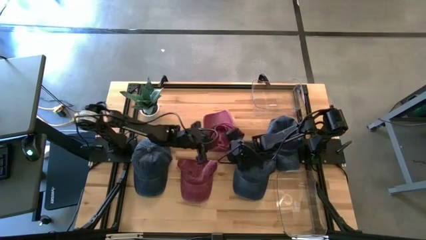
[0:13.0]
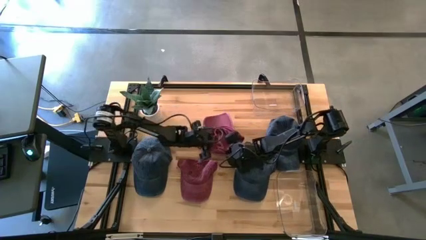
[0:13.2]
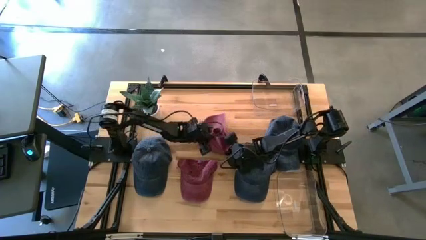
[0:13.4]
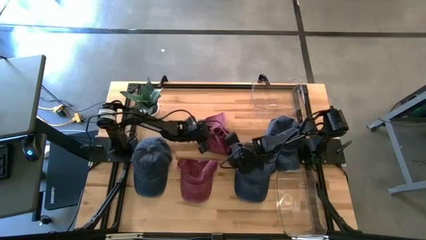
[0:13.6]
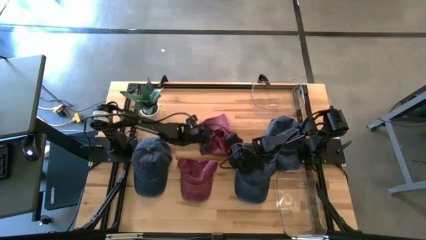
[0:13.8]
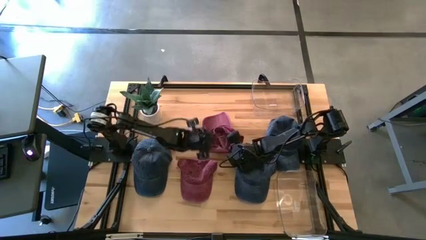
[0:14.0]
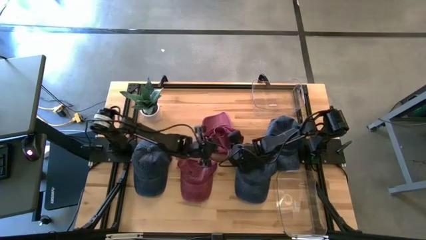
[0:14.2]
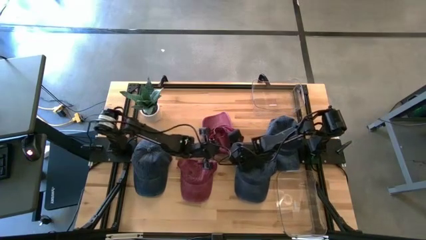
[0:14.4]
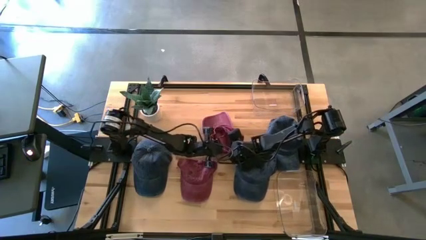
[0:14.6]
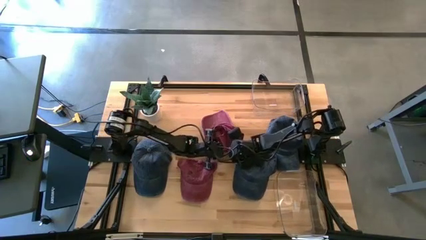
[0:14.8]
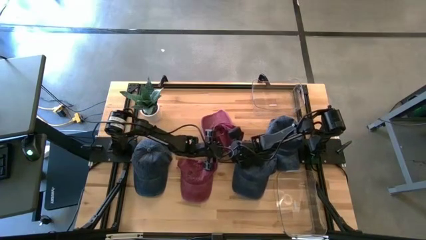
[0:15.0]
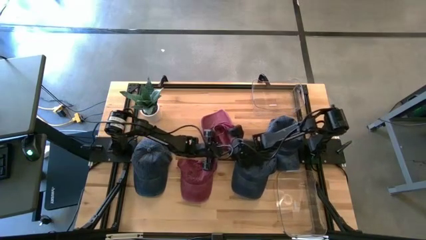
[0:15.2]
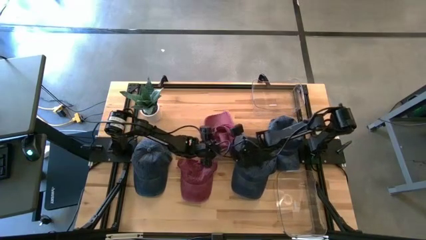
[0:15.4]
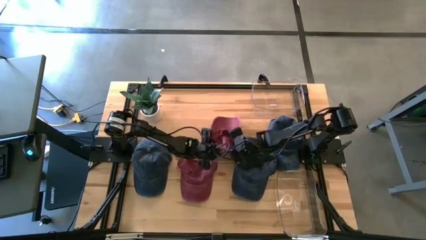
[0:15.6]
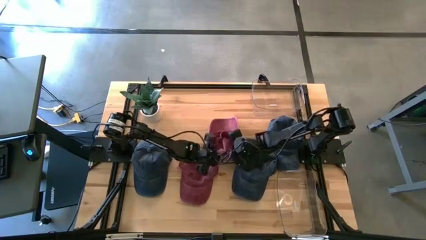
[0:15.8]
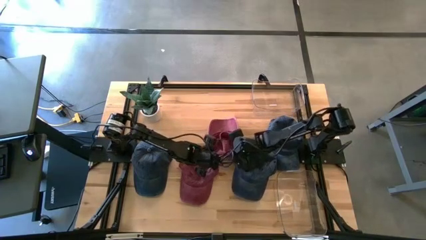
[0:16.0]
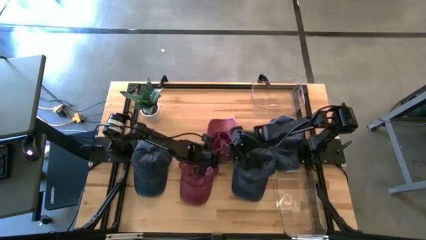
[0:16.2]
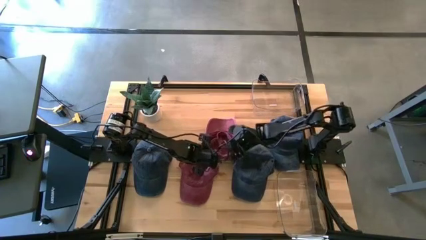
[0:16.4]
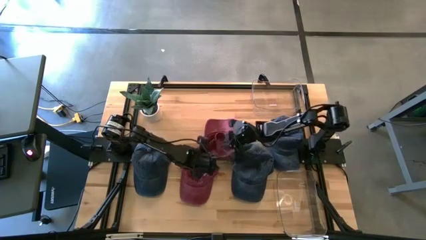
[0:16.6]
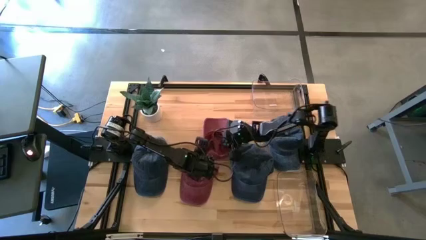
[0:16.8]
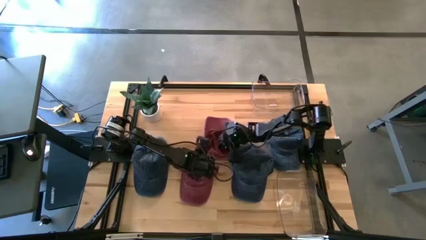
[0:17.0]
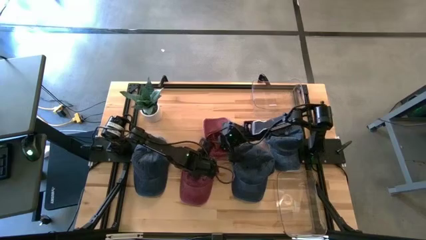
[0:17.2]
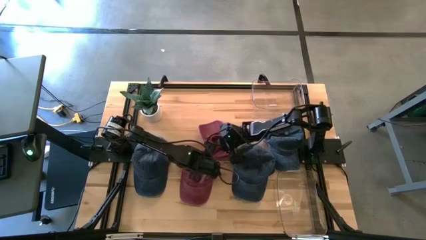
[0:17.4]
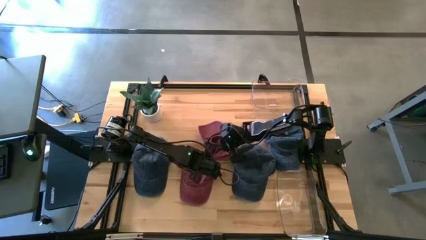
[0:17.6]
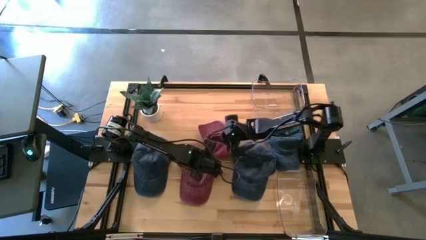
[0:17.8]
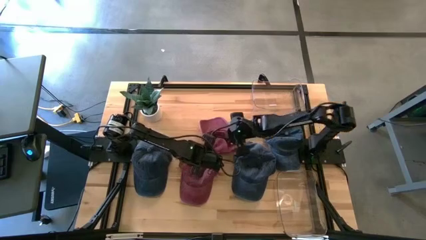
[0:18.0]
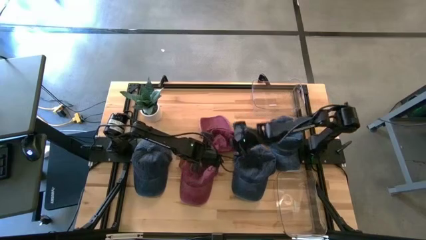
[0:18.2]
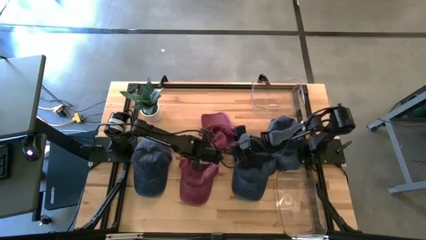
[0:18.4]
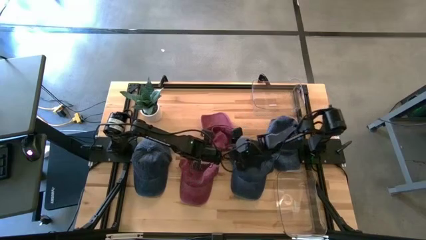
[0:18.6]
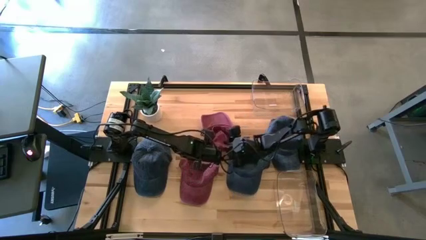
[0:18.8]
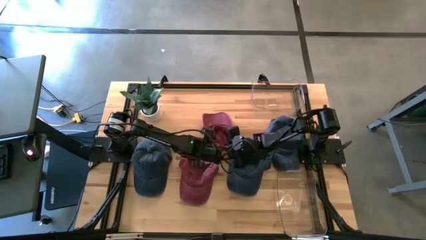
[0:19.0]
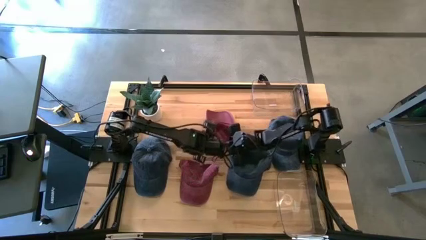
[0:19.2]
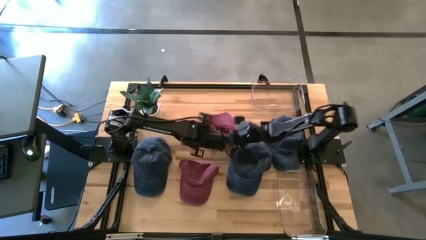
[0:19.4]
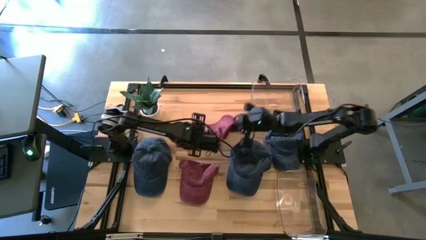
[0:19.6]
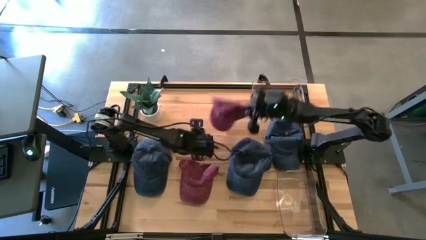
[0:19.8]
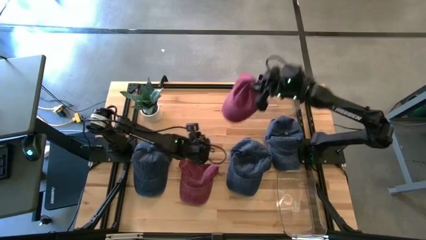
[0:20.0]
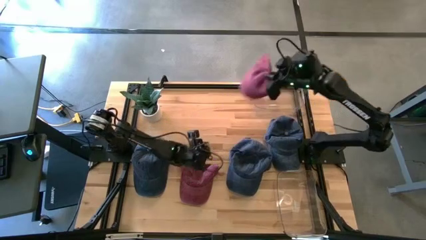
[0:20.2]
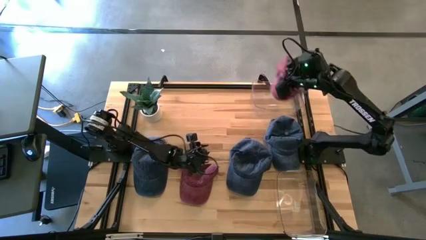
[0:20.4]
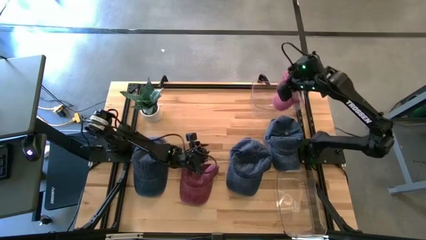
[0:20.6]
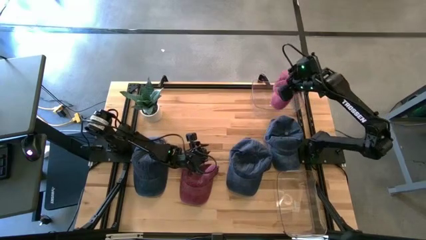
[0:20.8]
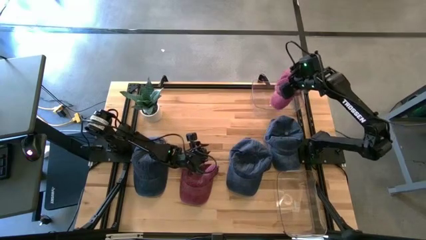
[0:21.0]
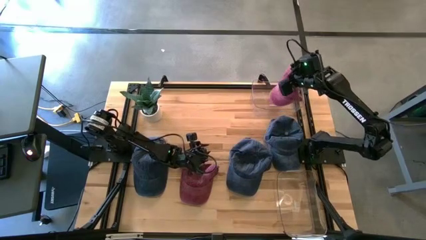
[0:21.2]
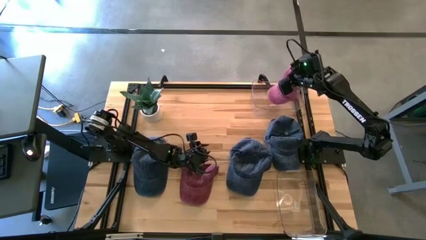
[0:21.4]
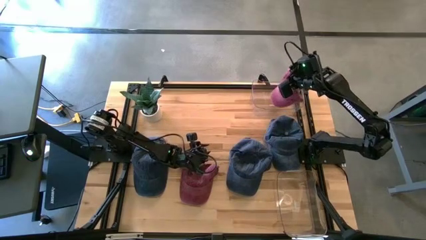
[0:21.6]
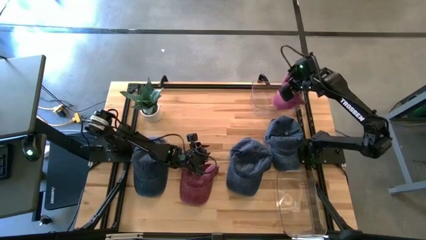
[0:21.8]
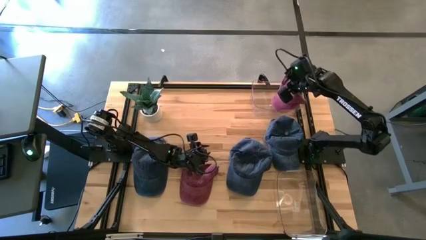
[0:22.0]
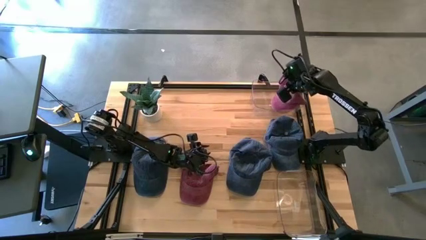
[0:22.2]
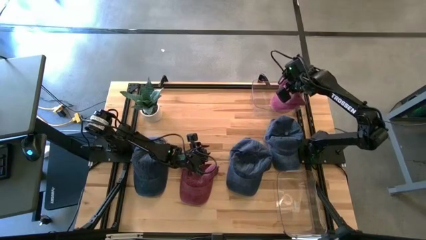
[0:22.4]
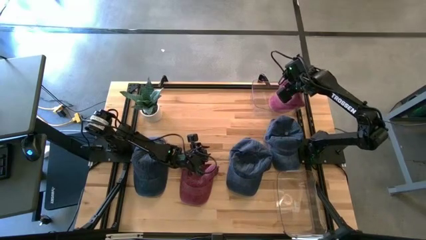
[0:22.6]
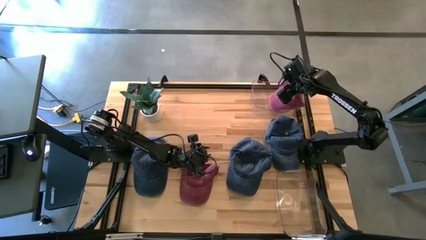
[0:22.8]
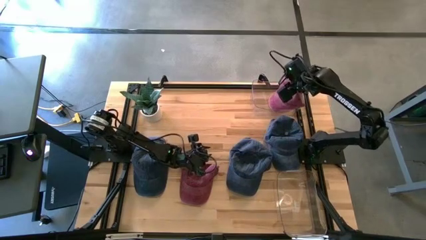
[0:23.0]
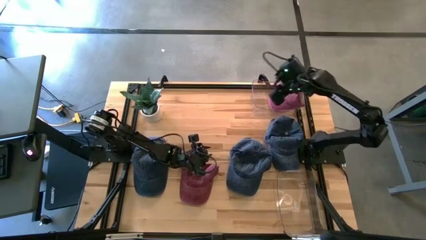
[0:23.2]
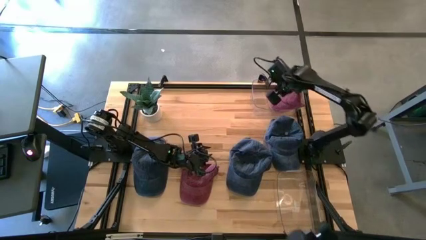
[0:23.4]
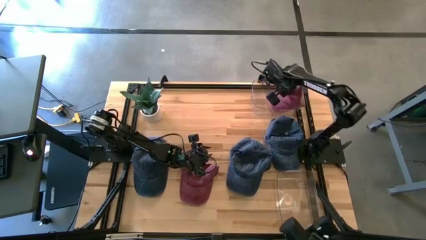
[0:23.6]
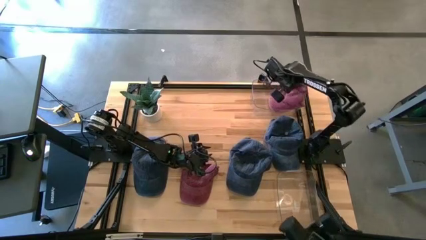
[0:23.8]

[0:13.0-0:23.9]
Task: Pick & Place hat
Put the top red cap into the top transparent bin
